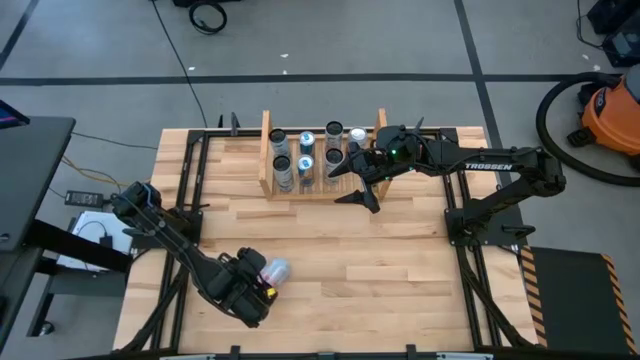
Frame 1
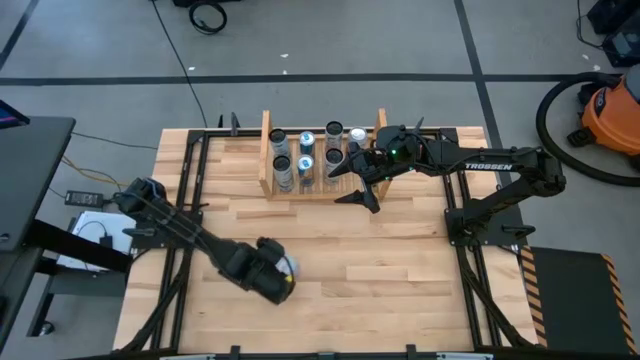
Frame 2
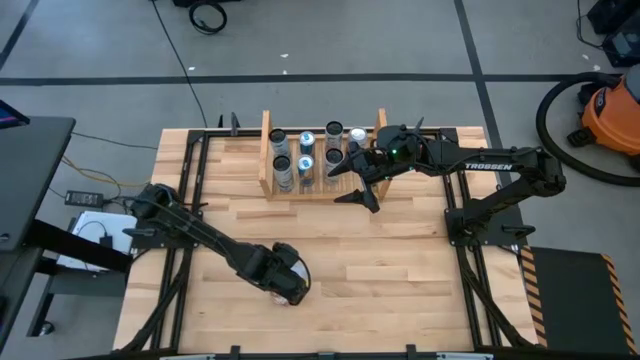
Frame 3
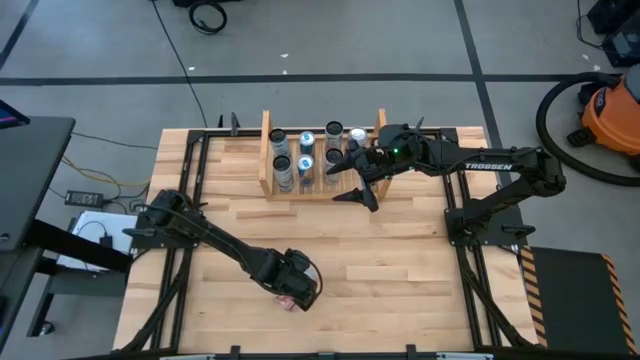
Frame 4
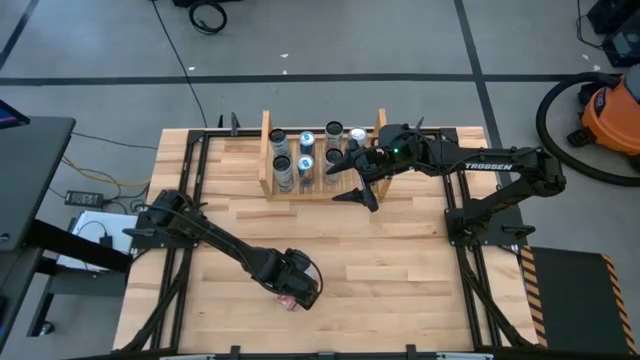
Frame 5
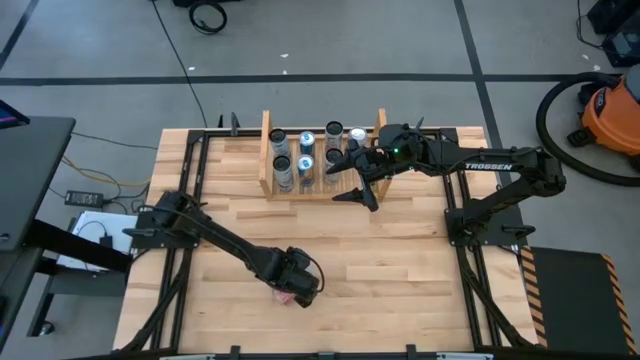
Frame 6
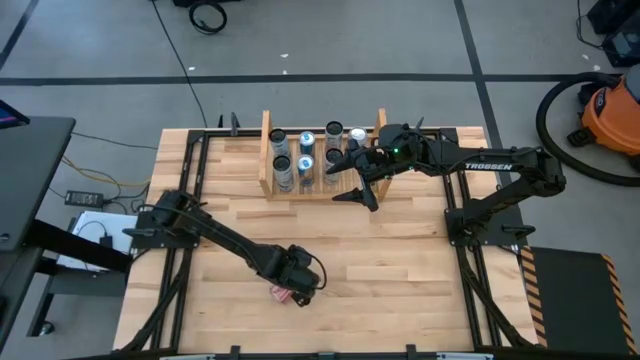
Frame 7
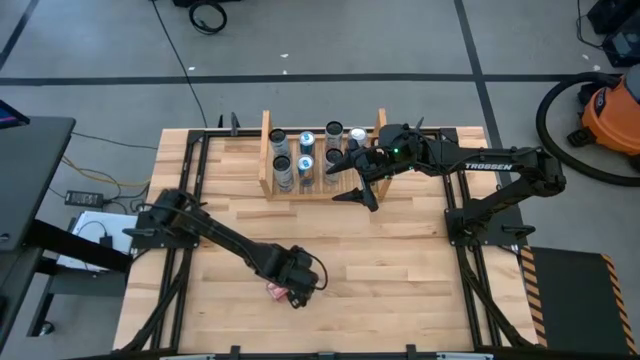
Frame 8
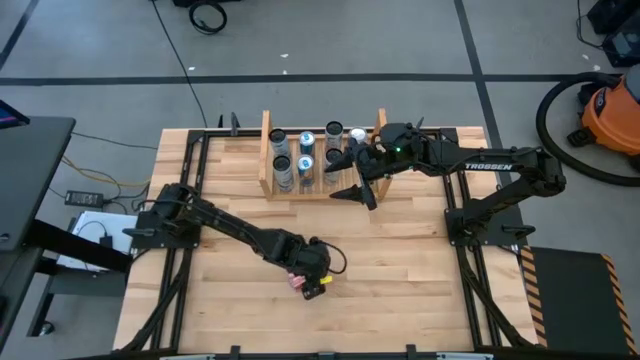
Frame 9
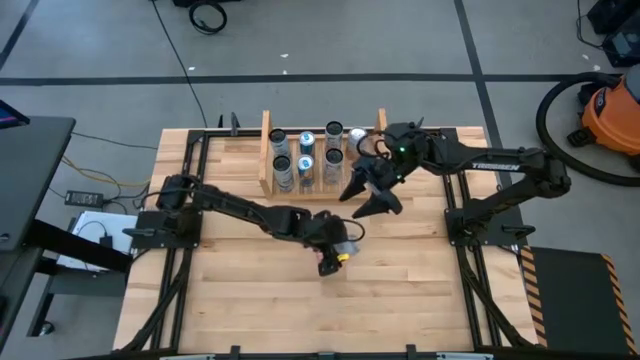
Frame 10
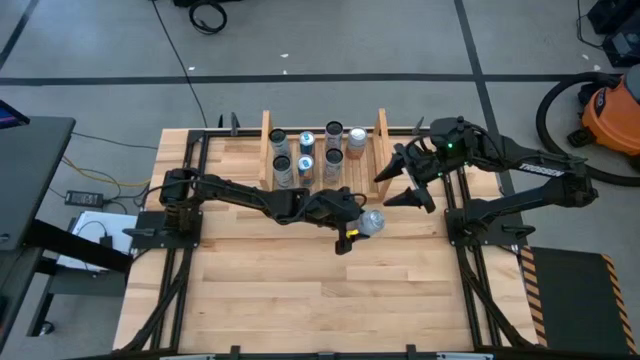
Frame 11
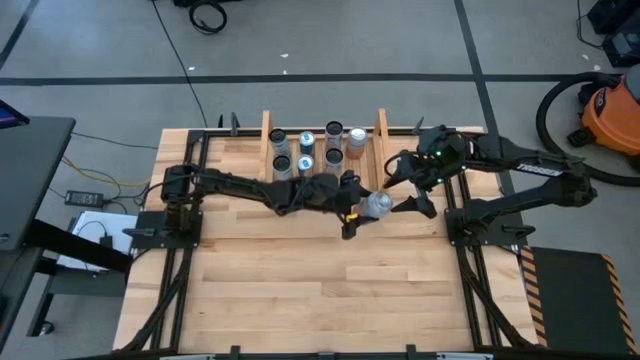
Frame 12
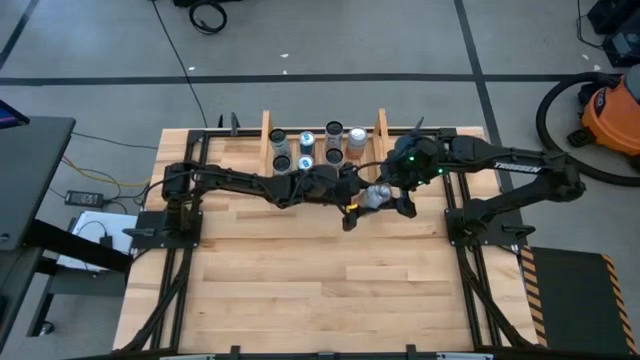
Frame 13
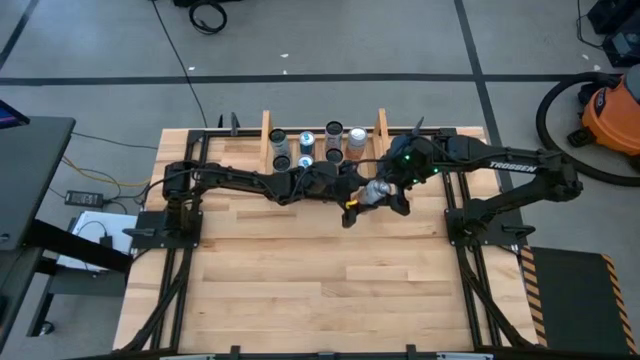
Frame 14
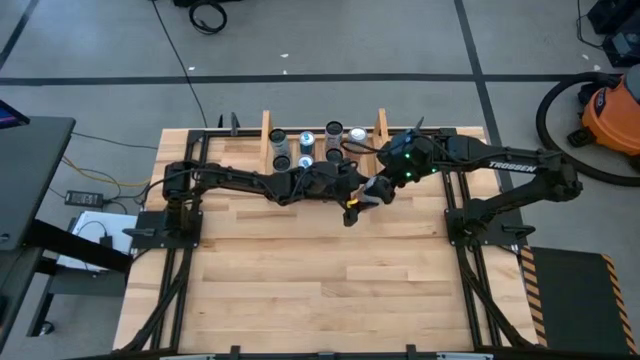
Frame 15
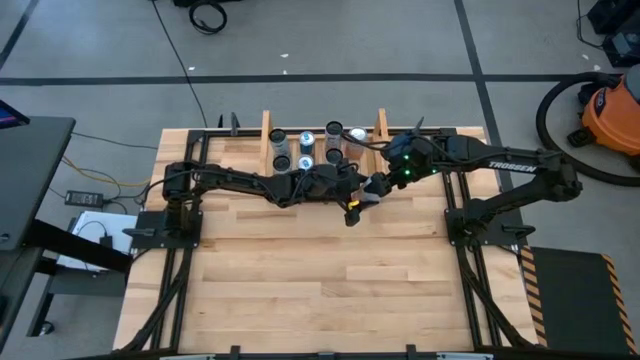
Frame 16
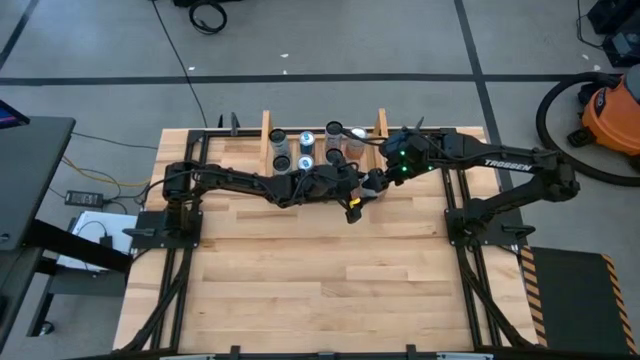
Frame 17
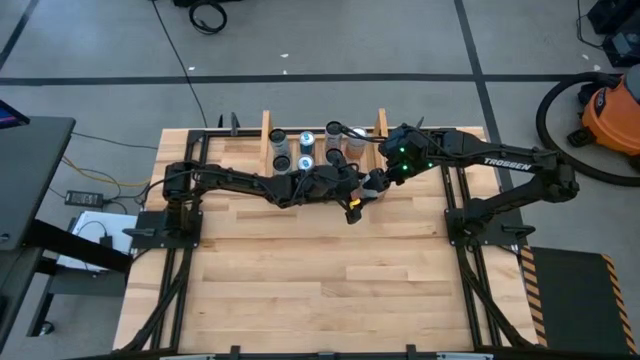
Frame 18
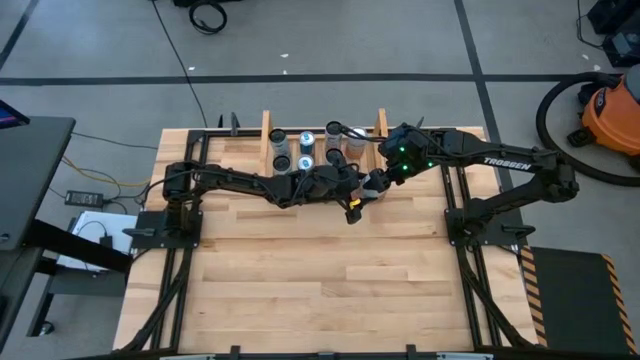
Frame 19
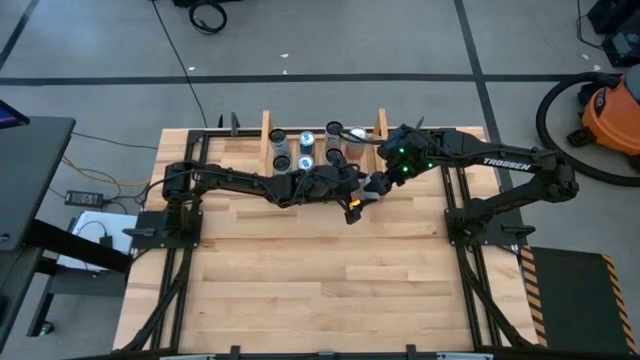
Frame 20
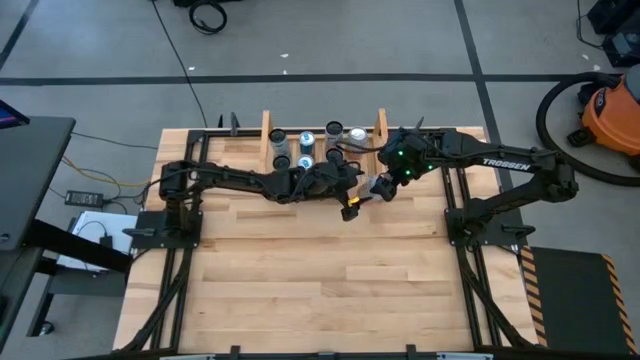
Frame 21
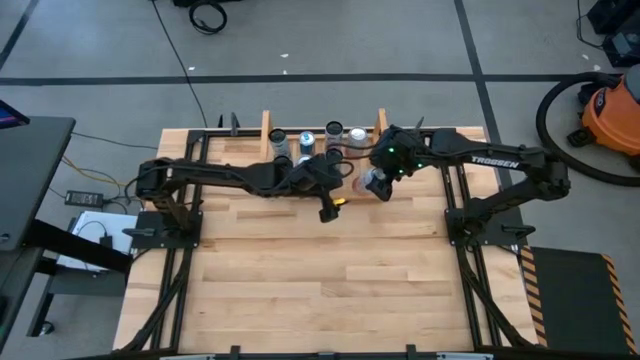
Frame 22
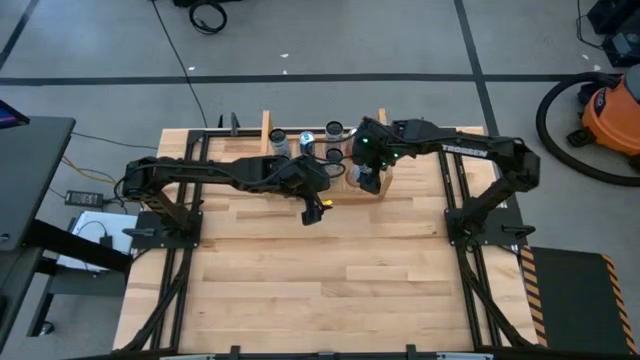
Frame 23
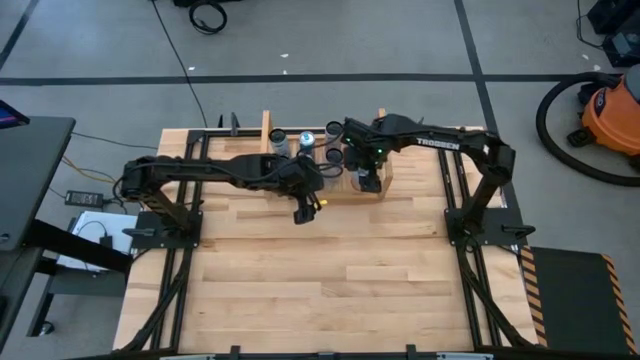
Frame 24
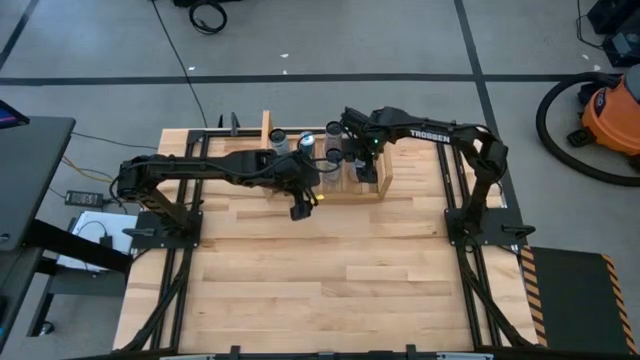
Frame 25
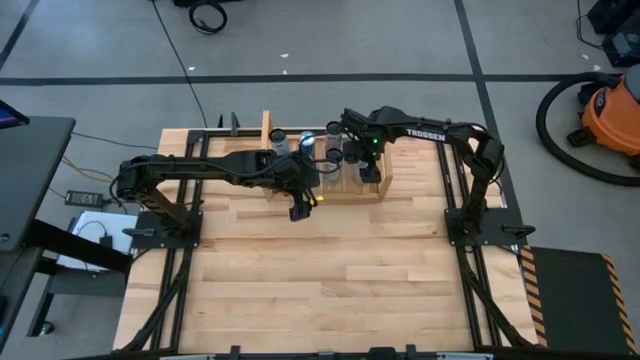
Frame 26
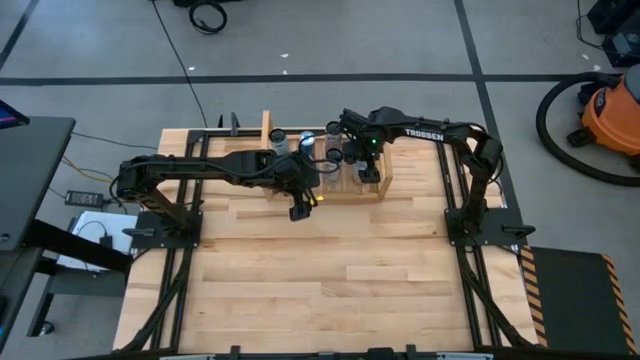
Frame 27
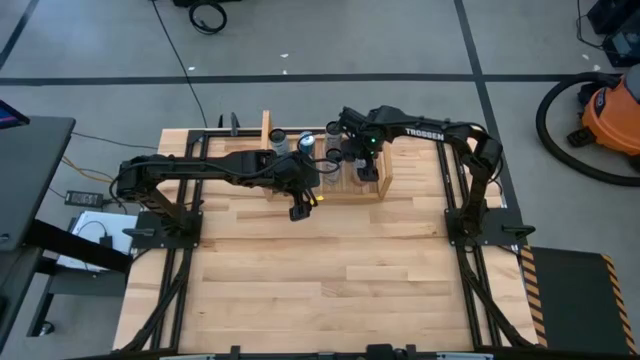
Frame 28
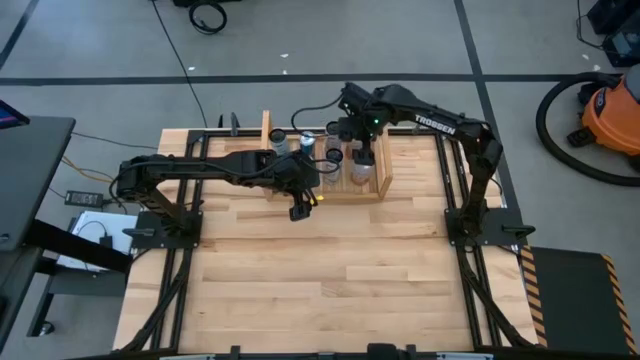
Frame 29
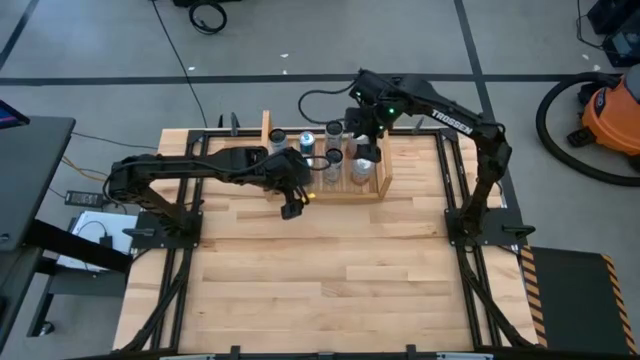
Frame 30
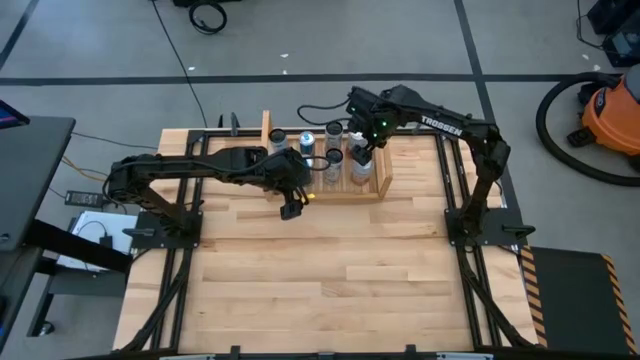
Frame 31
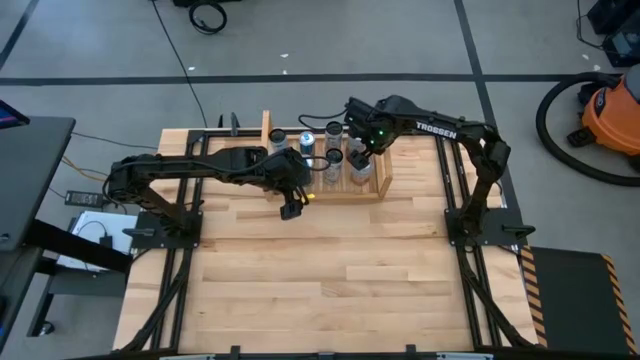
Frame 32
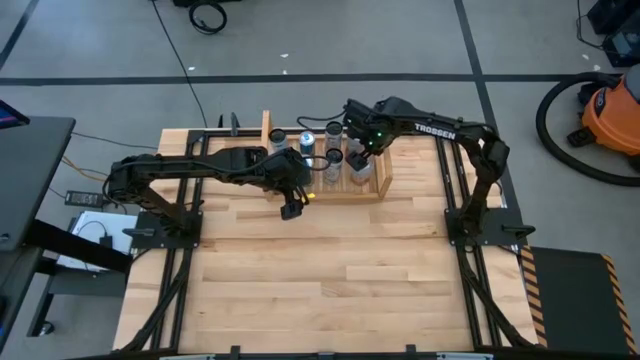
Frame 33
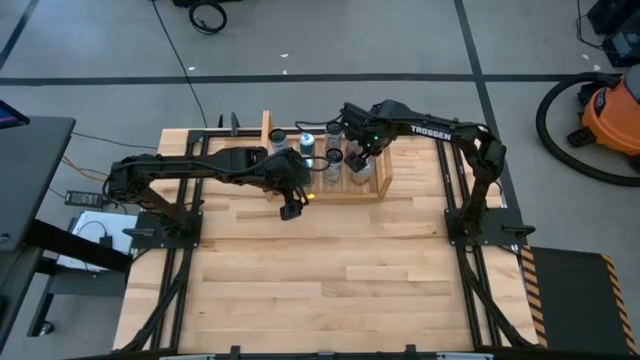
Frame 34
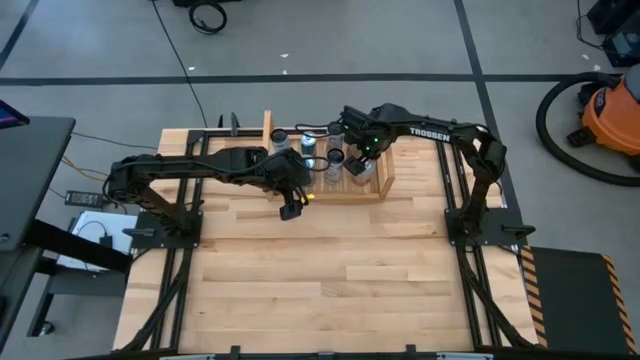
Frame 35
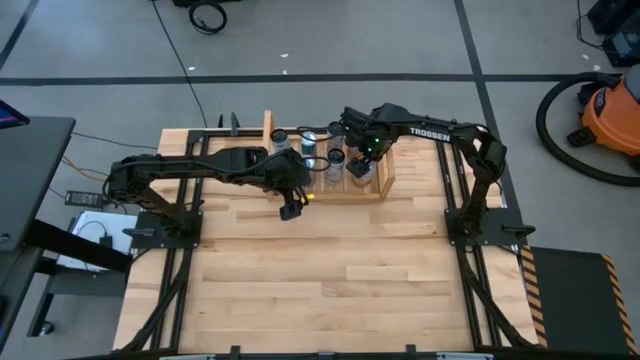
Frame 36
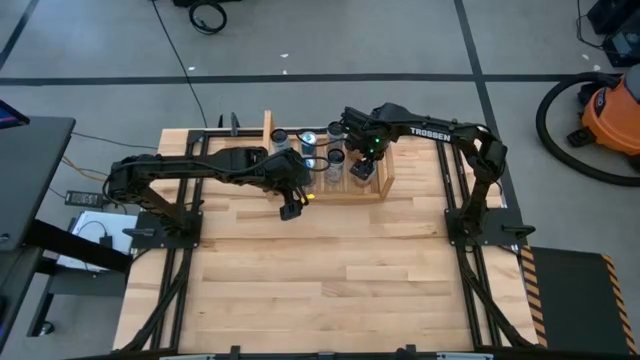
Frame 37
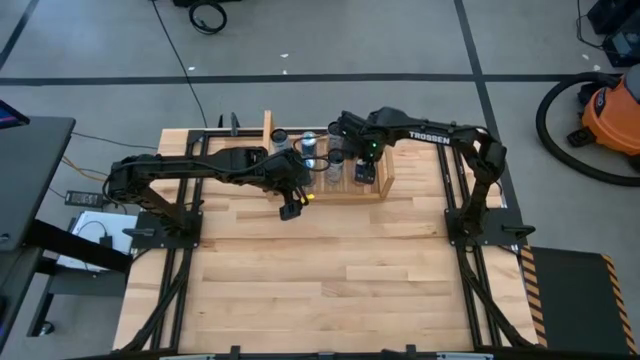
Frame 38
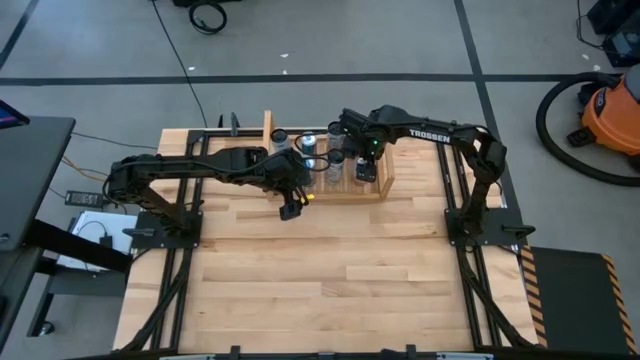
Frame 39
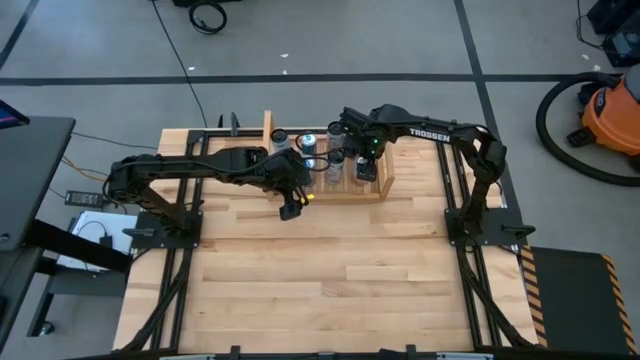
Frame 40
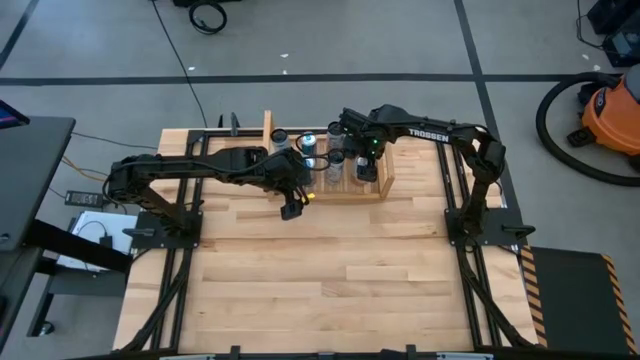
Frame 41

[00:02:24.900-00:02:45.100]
Task: Place canned beverage on shelf
Put the orange-white soda can on the shelf aligned with the other orange-white soda can
